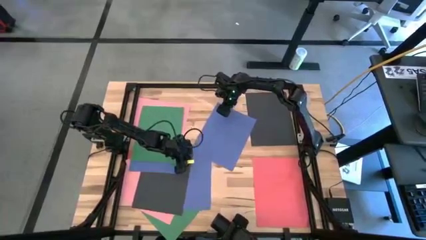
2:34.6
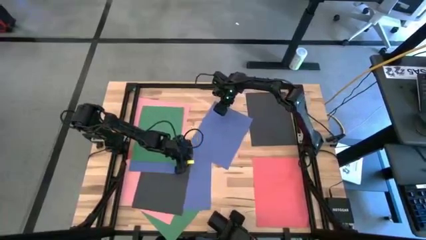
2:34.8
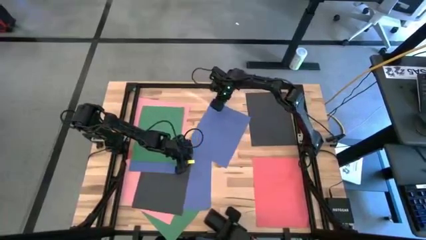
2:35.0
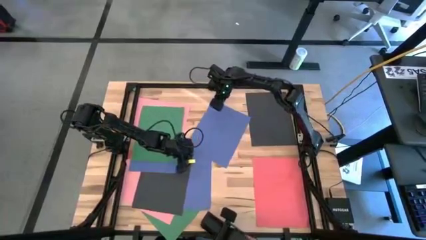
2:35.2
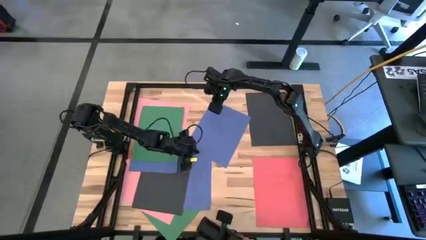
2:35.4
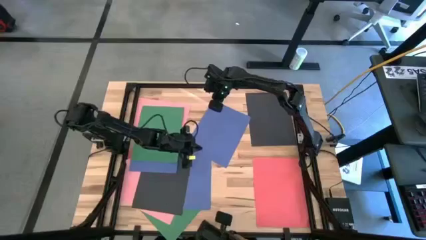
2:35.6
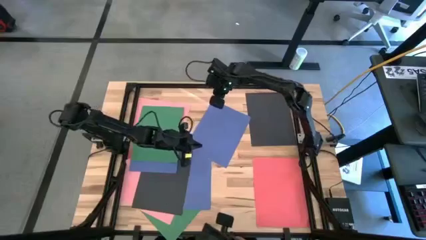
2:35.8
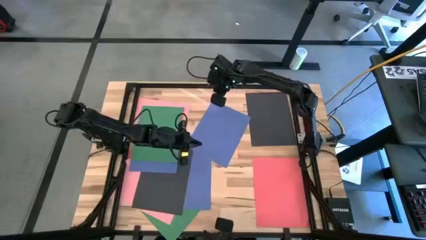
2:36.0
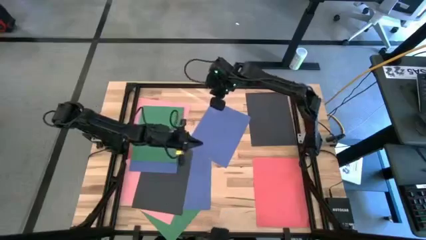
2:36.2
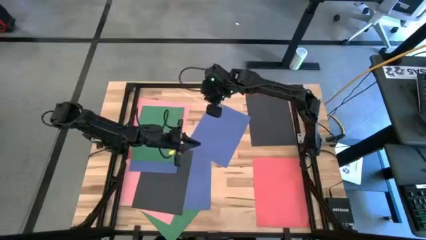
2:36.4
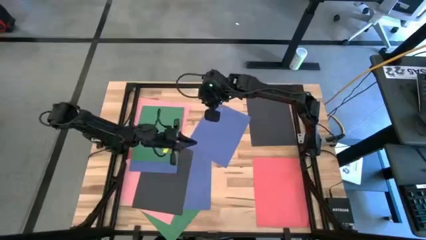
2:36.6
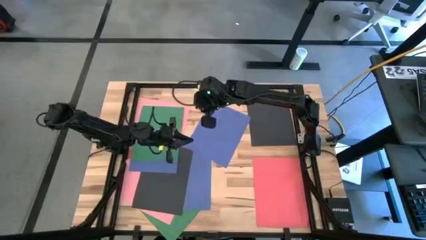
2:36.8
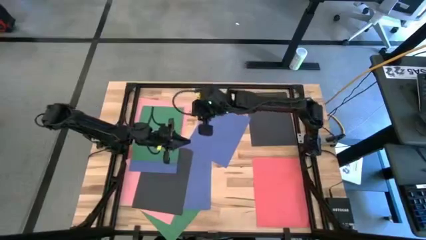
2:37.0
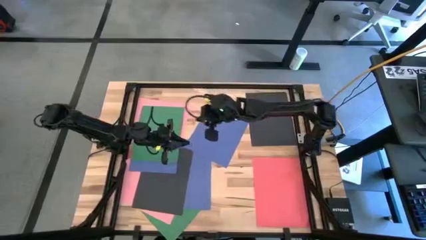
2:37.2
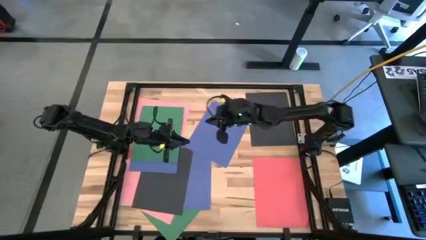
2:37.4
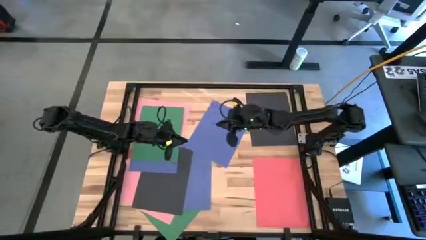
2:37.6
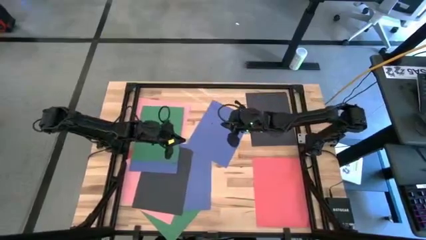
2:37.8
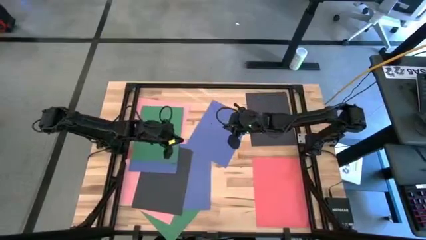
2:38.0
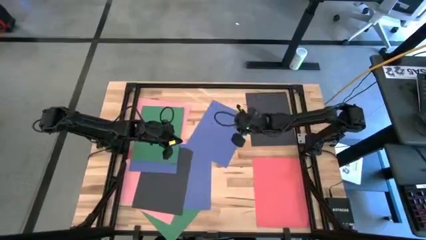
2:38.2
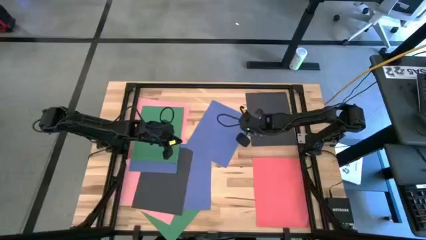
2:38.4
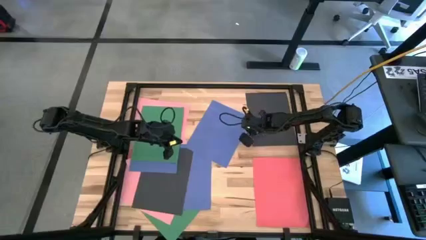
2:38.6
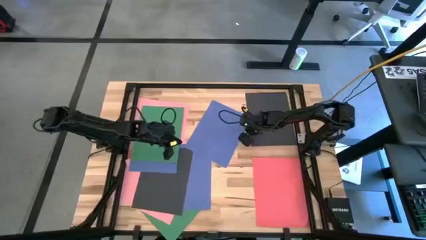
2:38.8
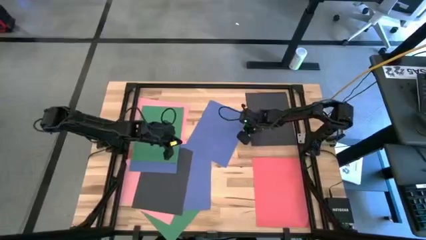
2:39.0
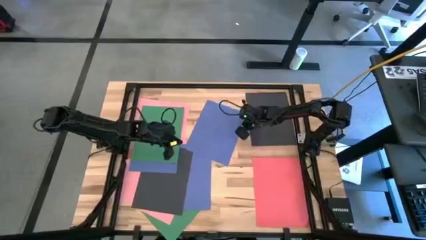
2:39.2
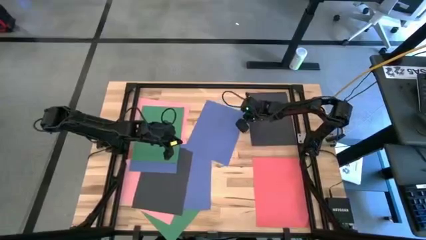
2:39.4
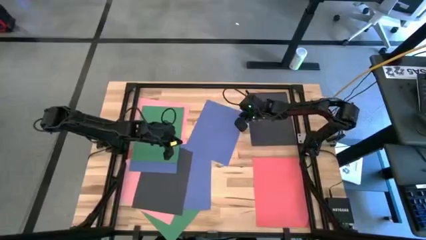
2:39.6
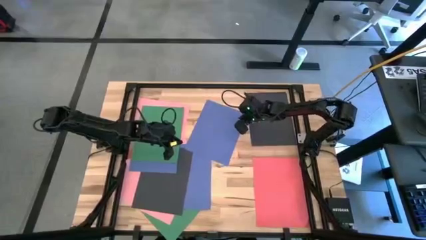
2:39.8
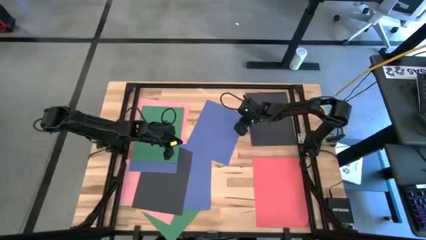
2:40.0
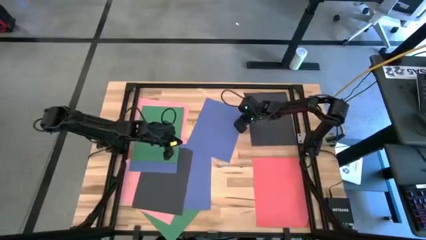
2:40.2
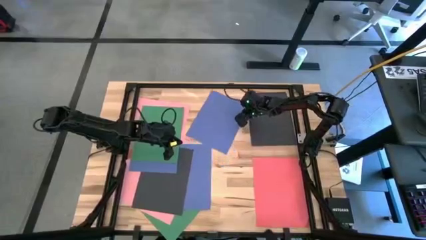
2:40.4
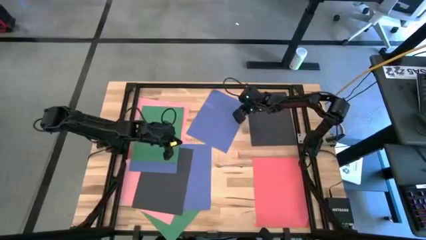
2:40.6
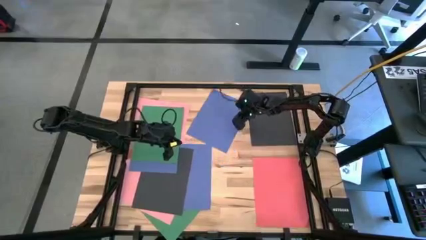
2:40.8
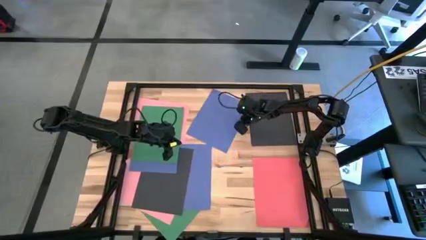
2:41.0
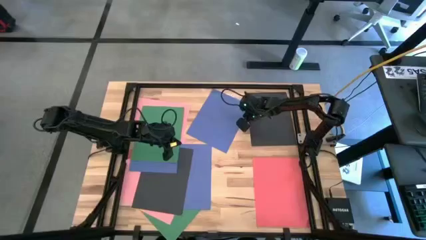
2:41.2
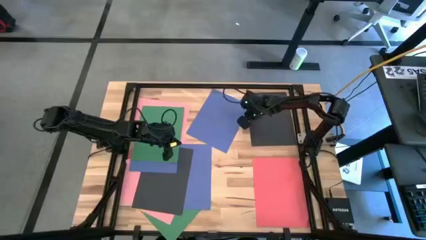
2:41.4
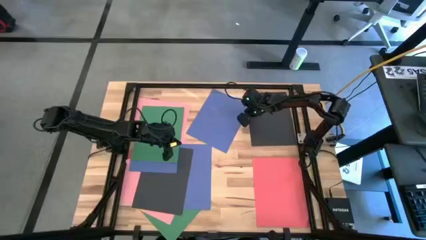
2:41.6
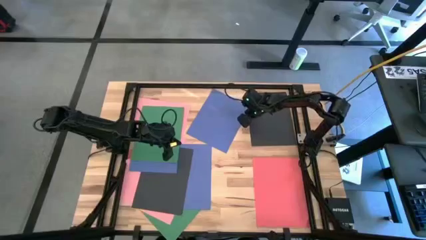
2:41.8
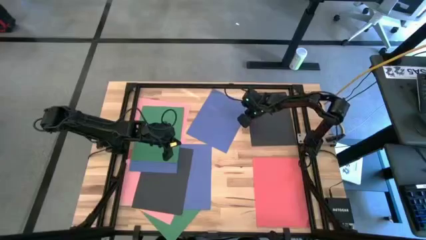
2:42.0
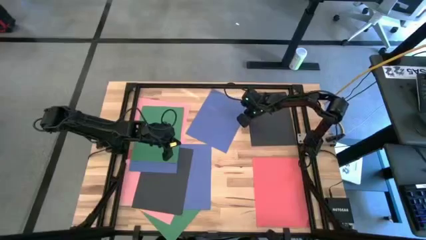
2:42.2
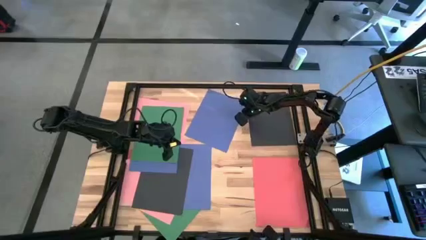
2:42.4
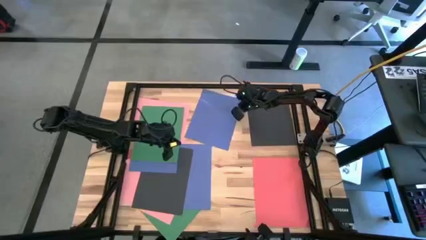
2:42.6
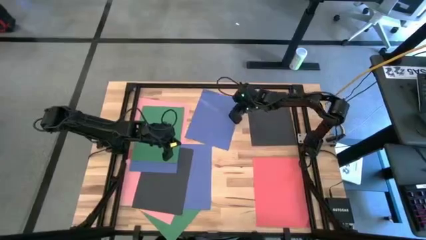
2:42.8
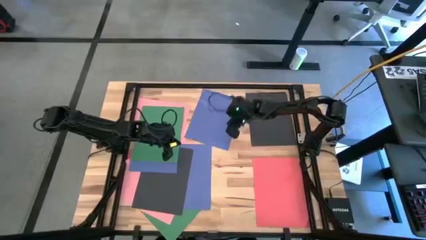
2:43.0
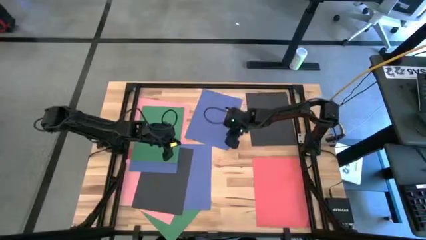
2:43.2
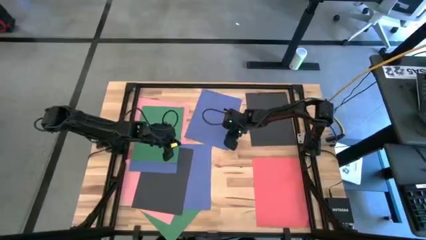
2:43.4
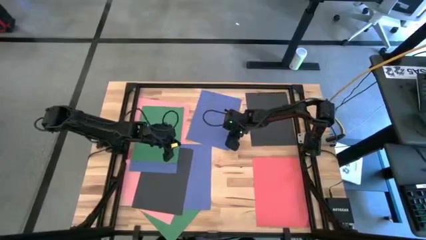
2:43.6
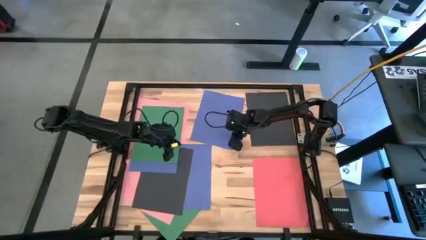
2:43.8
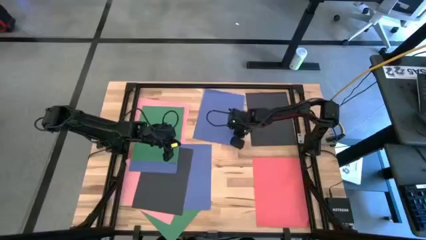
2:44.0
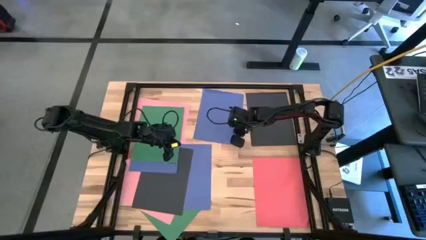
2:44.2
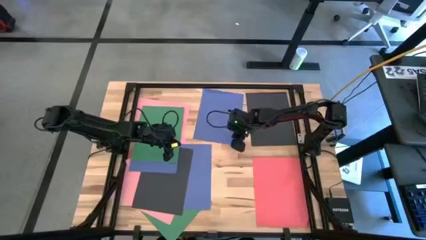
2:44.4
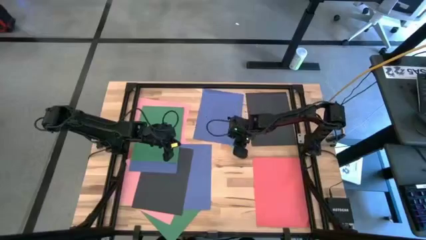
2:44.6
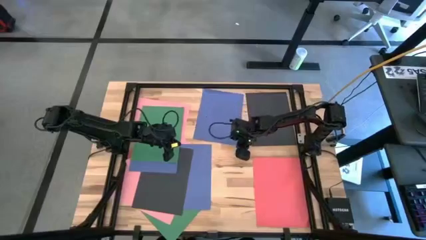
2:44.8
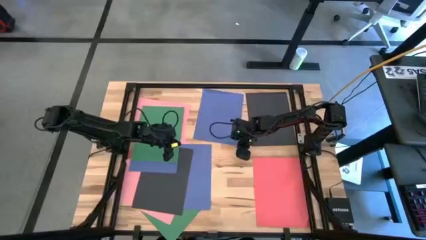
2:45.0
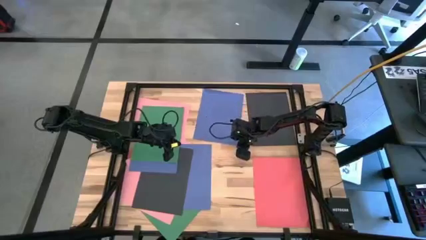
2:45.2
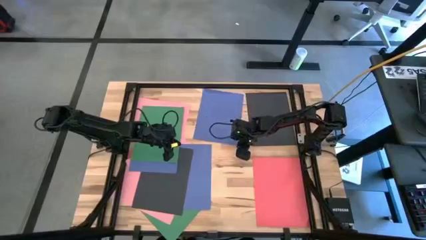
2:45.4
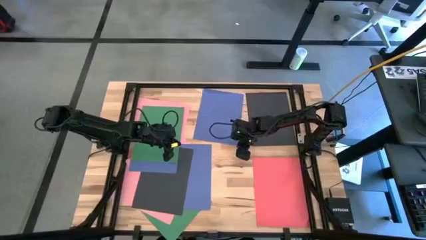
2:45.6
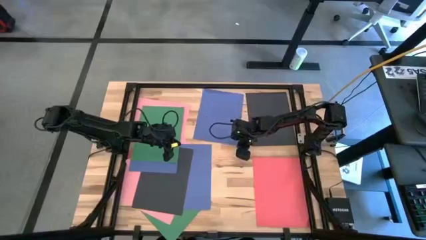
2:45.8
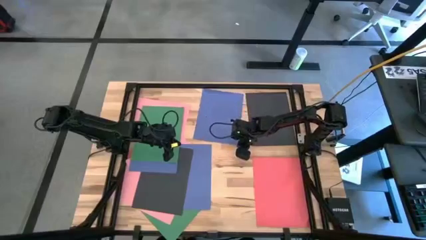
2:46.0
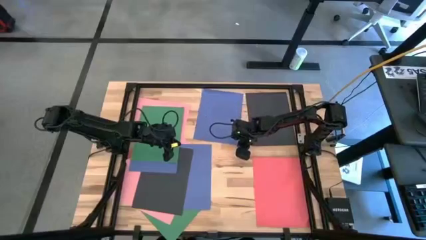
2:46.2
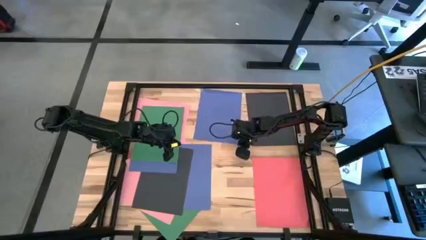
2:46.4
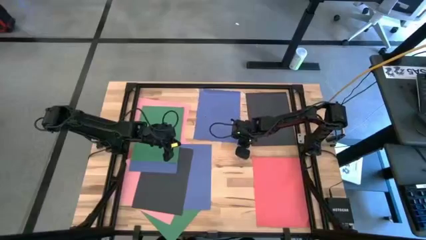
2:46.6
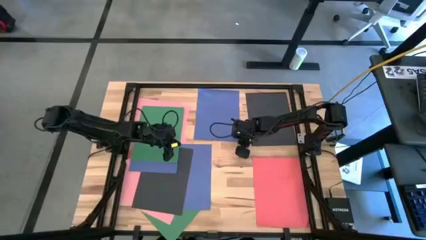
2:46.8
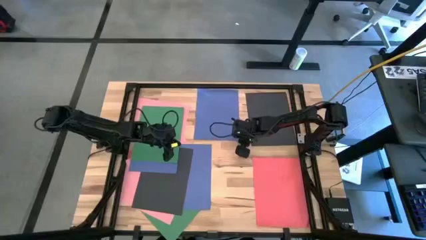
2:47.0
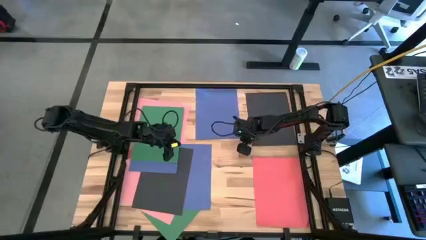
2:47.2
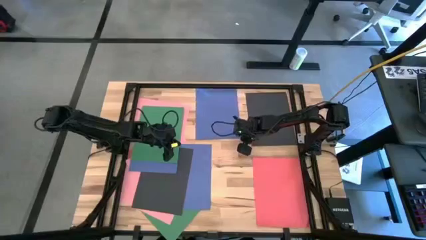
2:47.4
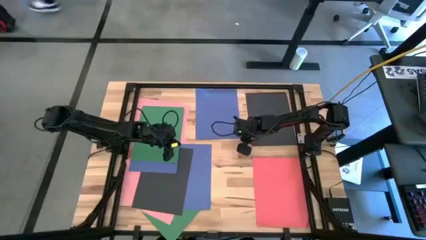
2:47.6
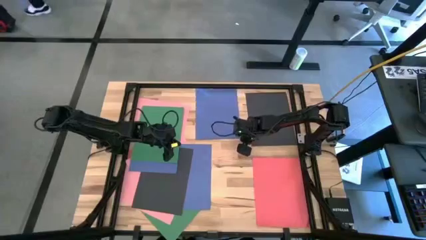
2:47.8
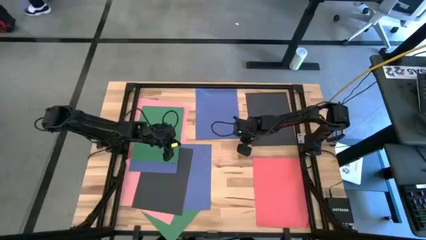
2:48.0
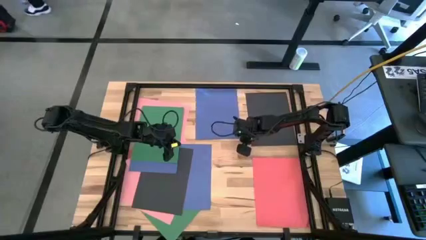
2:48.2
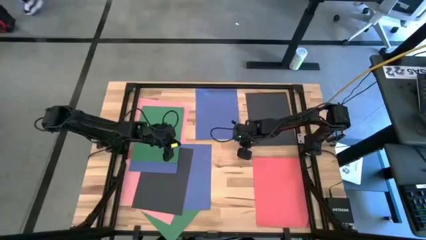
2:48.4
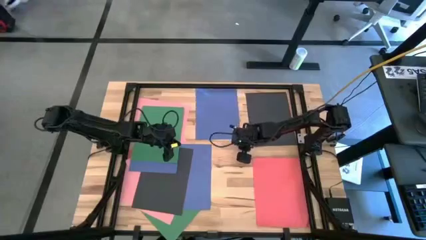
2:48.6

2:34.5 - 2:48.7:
Task: Organize paper
Move the blue paper to the top center of the table
